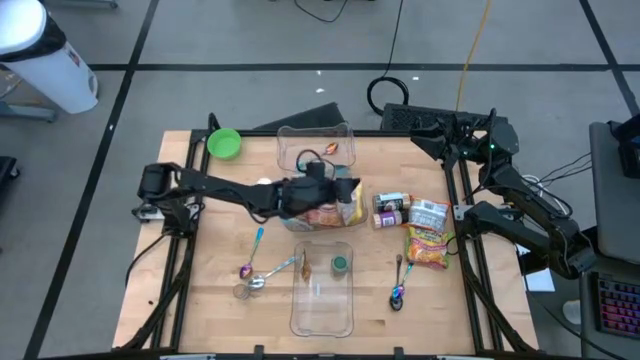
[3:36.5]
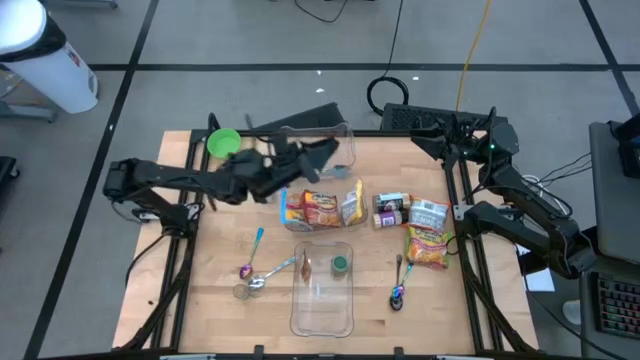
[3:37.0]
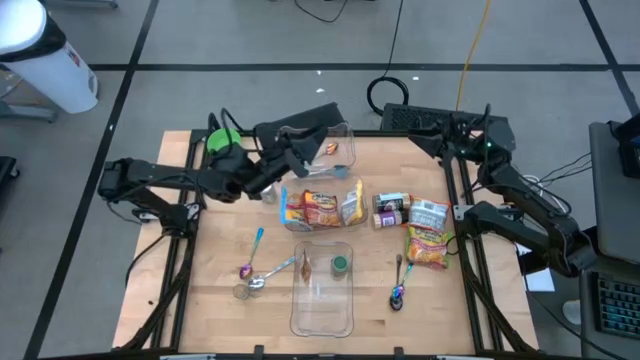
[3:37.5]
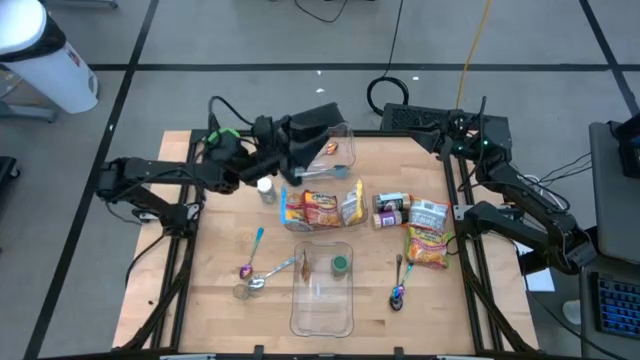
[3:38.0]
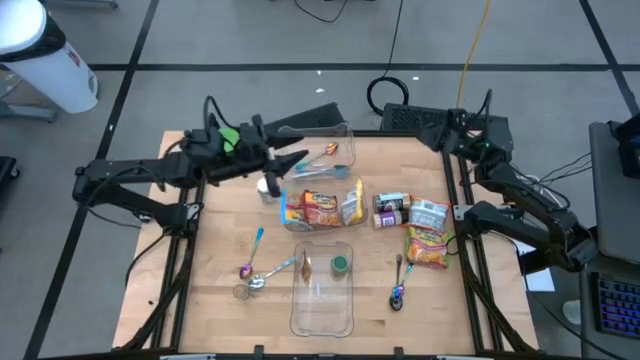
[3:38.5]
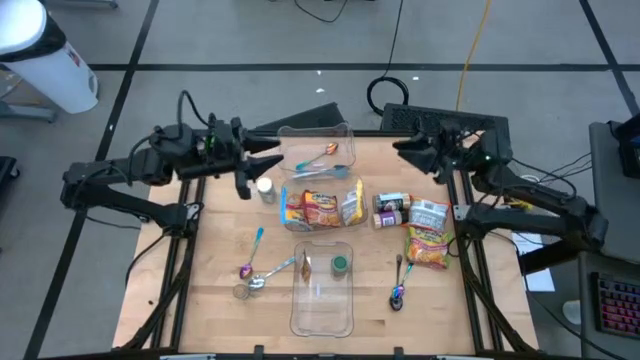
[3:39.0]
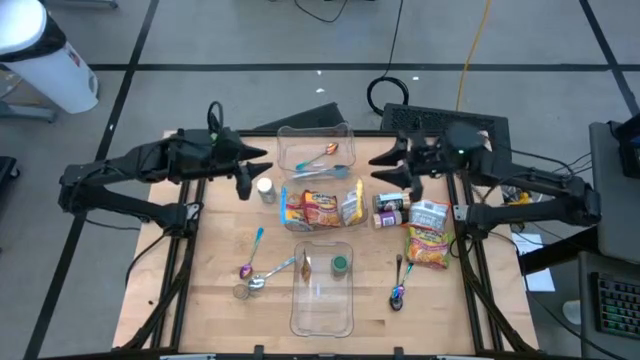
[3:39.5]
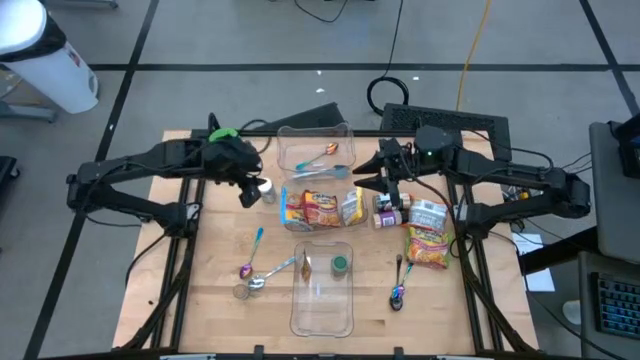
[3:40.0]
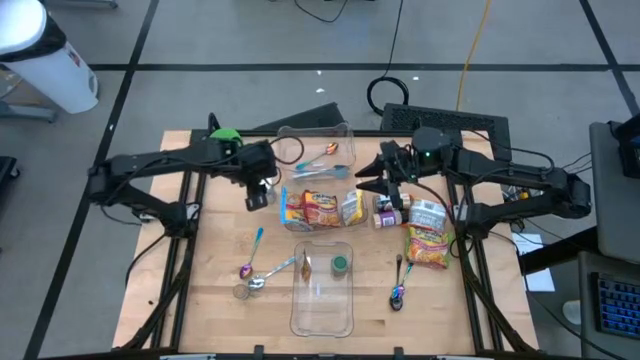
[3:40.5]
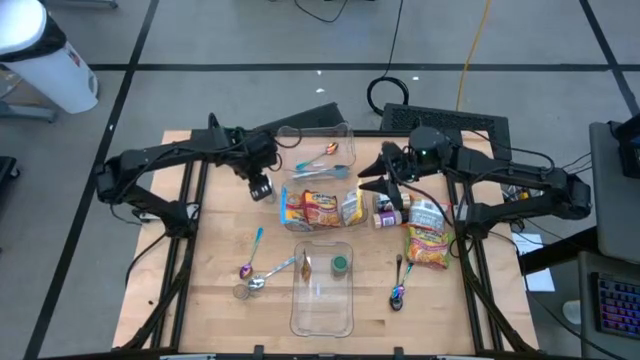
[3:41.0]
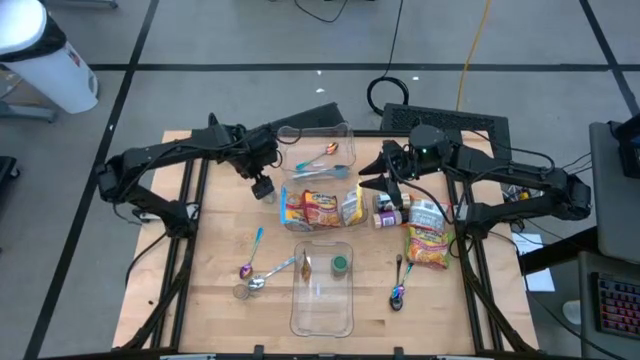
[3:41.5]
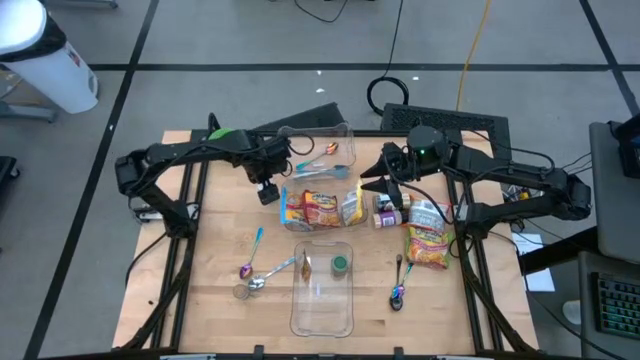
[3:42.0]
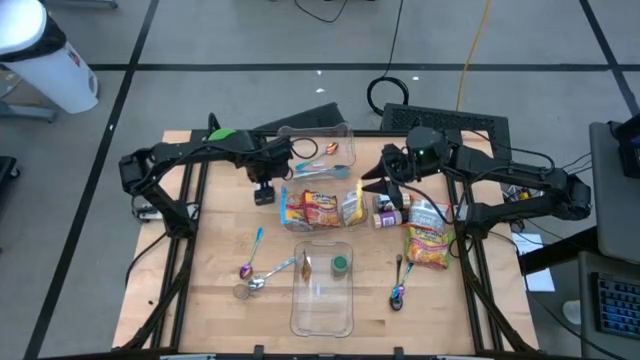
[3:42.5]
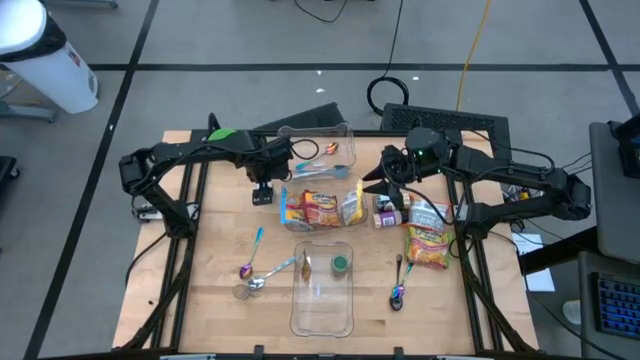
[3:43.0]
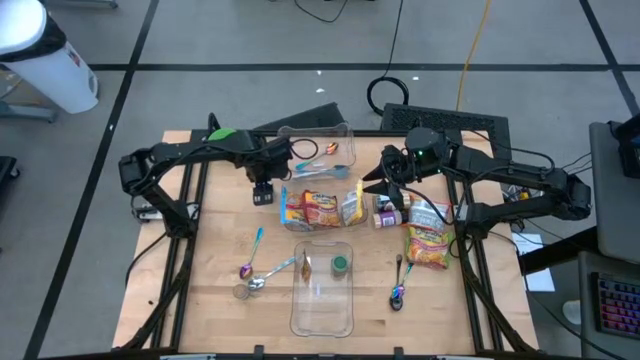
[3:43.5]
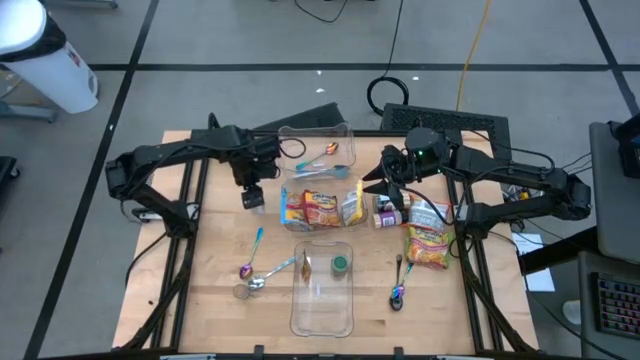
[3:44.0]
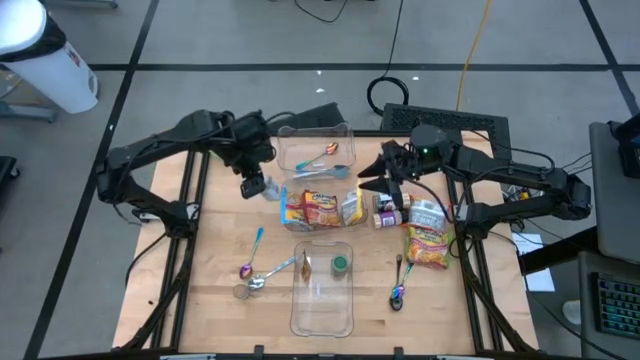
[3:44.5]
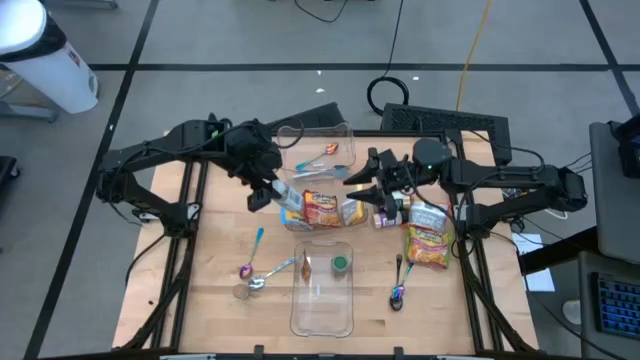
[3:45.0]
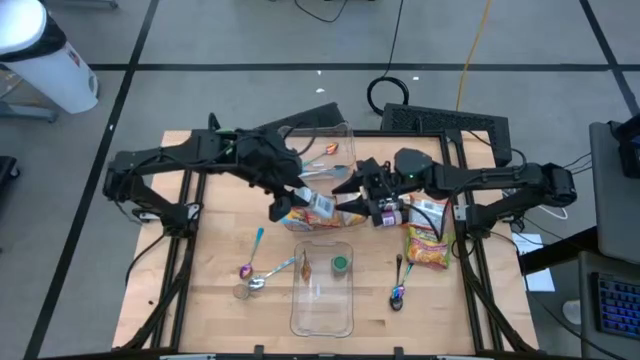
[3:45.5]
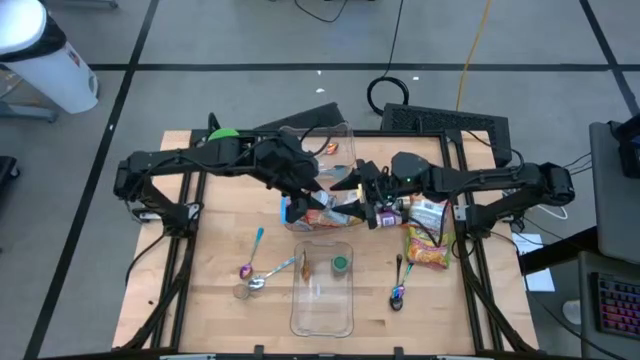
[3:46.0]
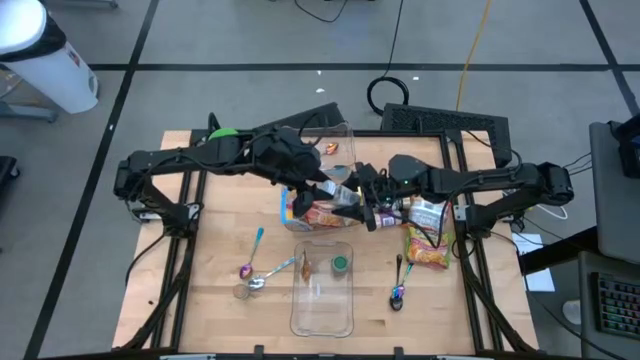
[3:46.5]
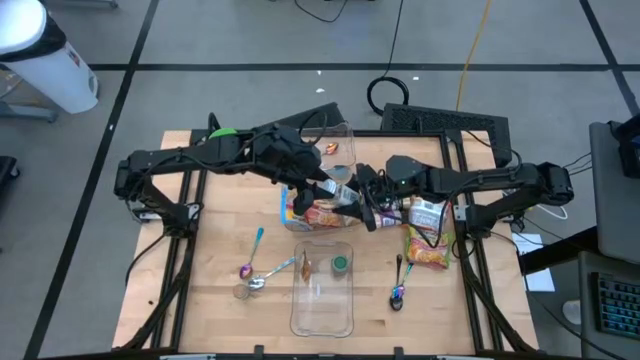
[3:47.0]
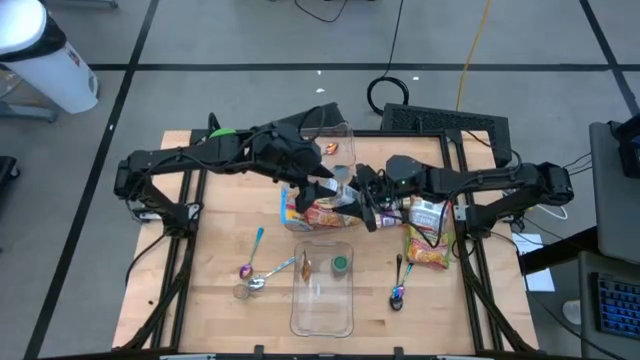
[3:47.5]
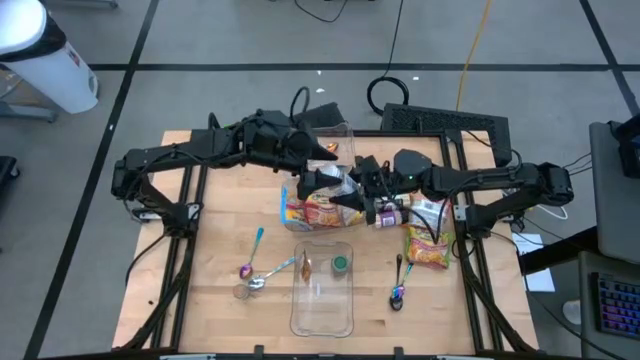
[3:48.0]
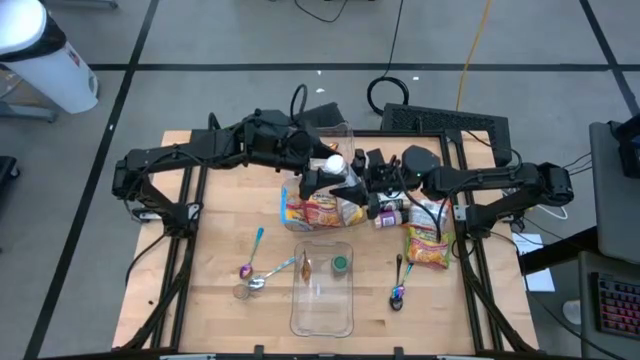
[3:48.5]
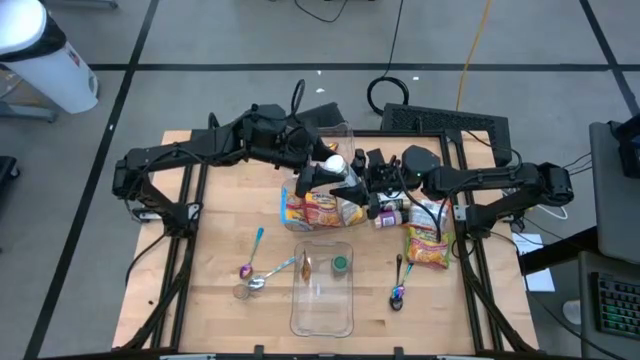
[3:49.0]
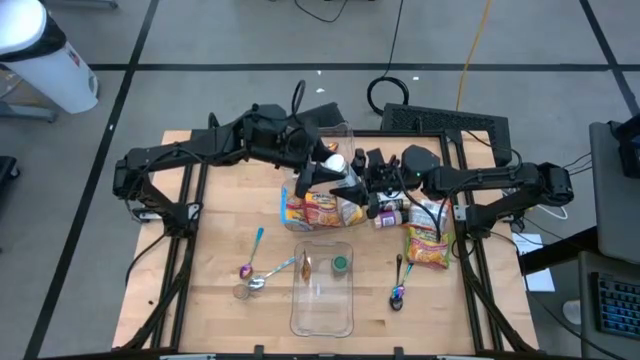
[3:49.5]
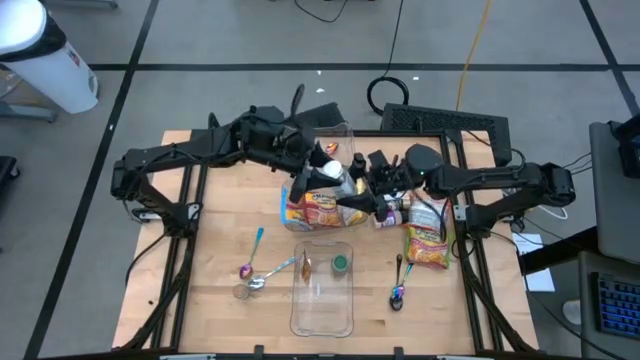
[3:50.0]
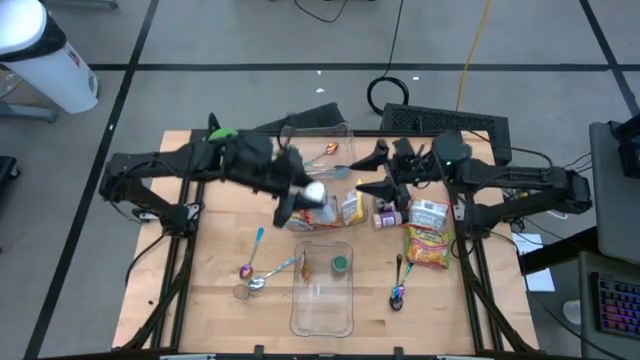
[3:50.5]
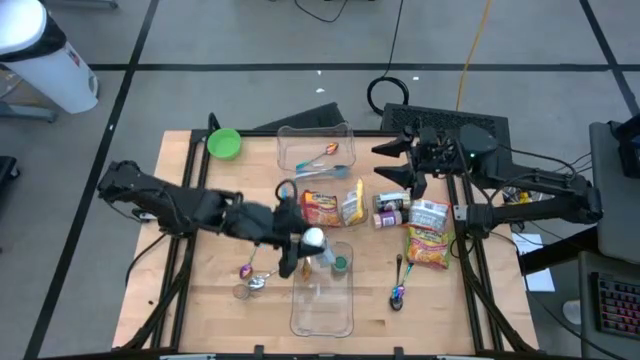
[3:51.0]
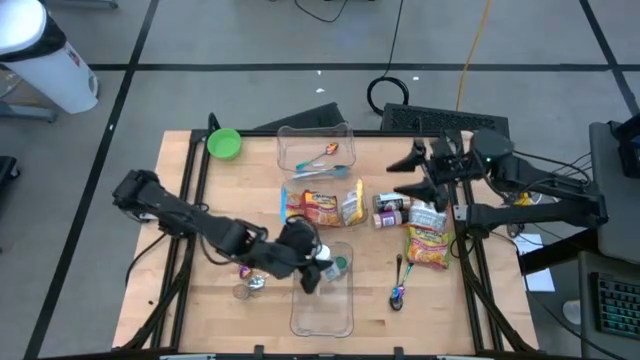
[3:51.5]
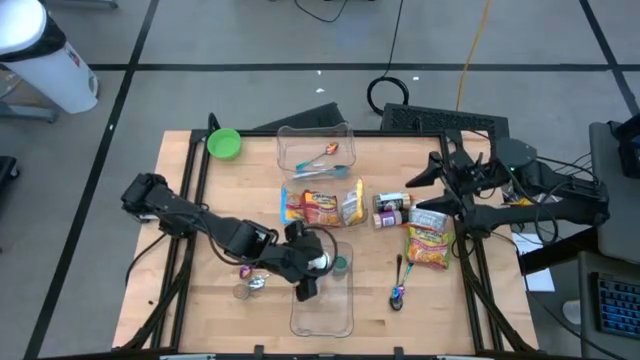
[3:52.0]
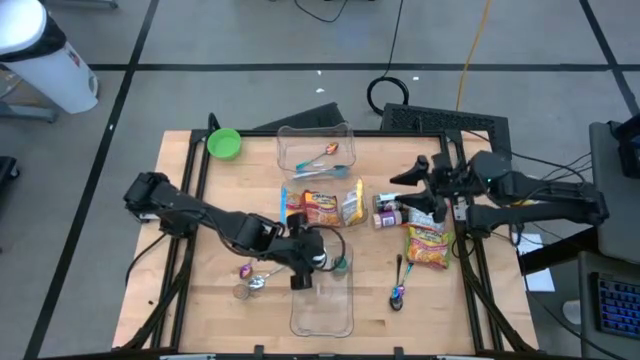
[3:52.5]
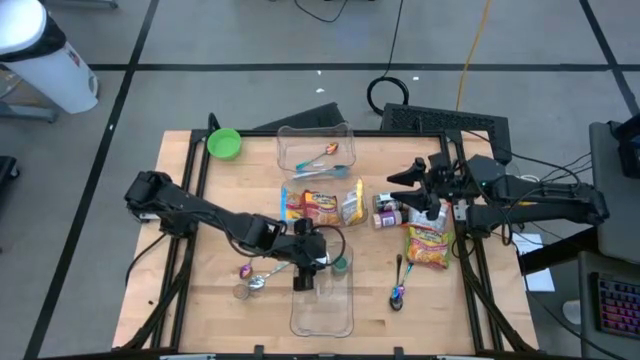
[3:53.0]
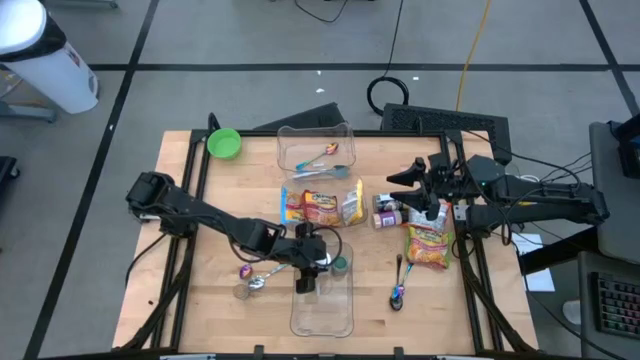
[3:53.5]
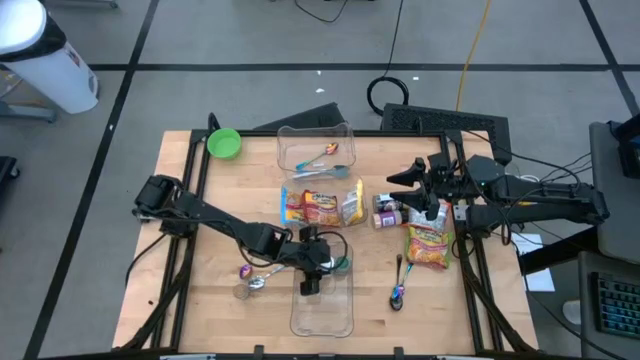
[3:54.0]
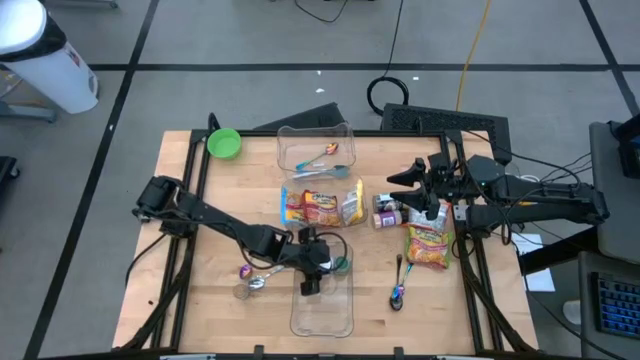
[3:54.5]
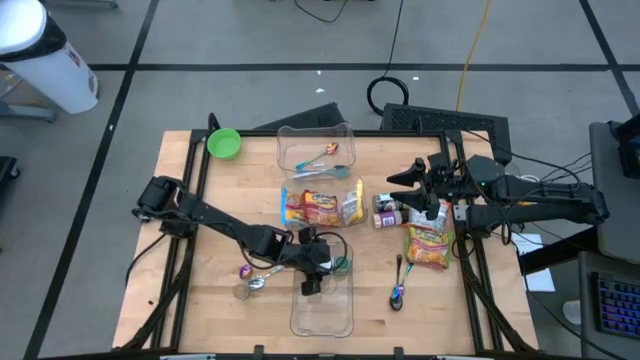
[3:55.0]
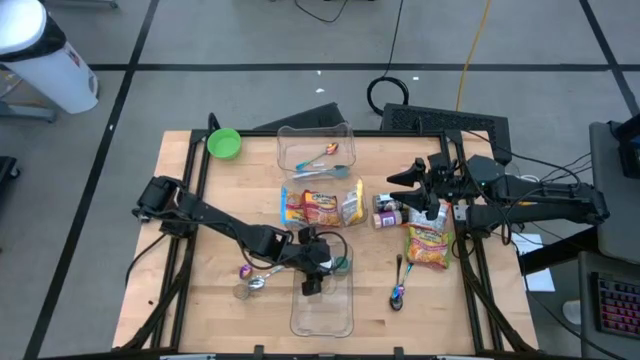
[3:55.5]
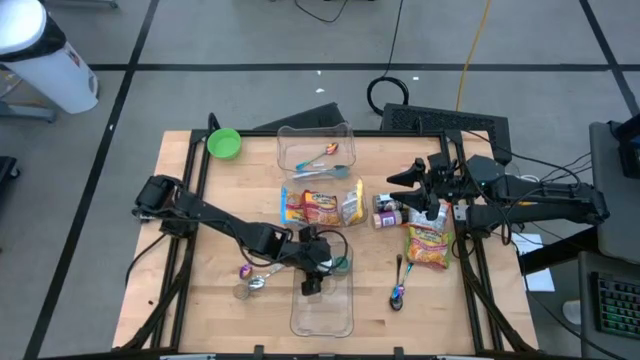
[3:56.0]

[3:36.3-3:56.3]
Task: Pick & Place Food Item
Put the white seasoning bottle into the bottom transparent bin

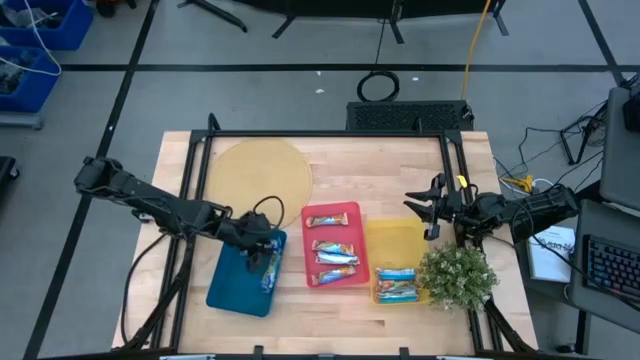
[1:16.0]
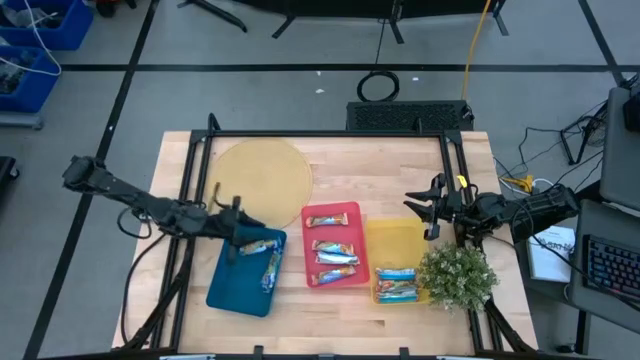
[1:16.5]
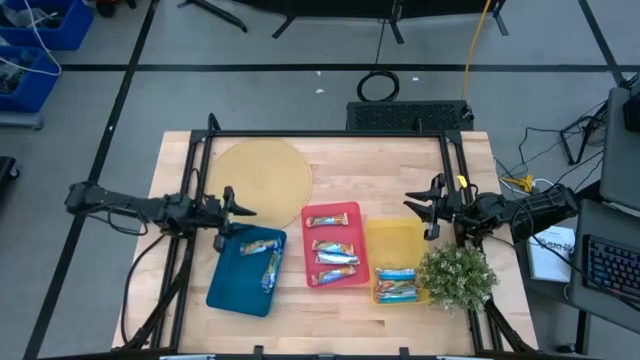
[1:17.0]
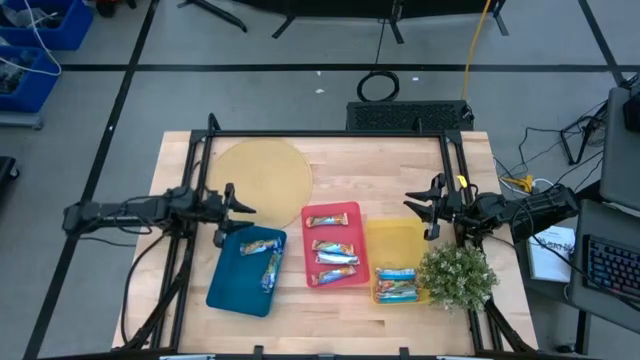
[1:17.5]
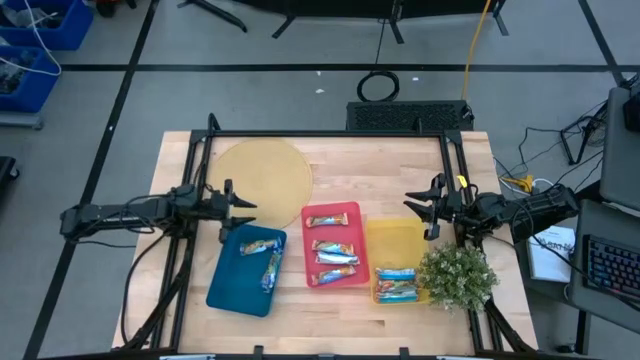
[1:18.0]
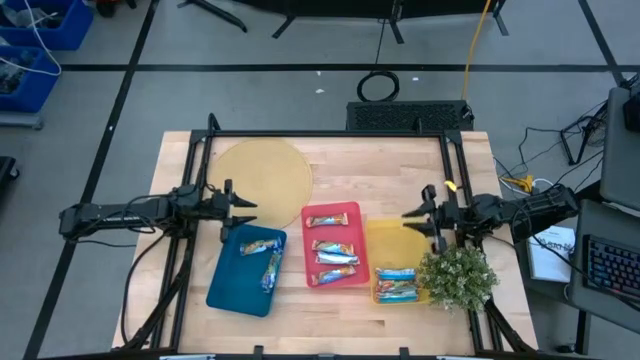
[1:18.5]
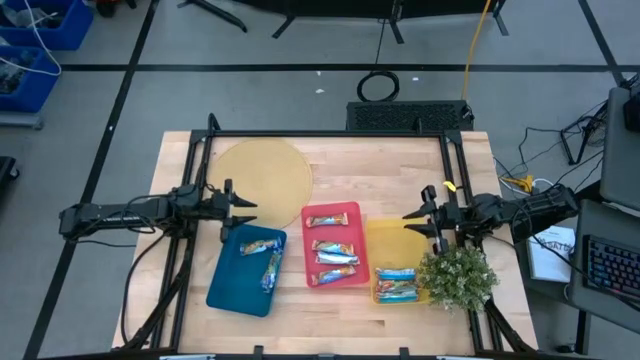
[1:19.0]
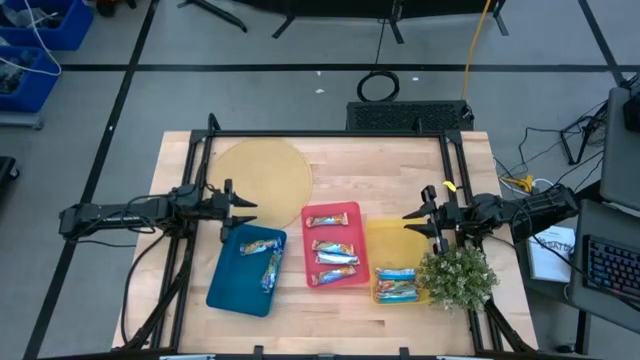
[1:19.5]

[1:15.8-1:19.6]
Task: Pick and place Granola Bars by type
Return to Home Position
